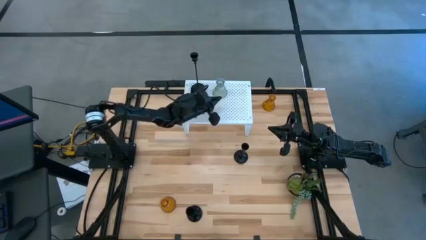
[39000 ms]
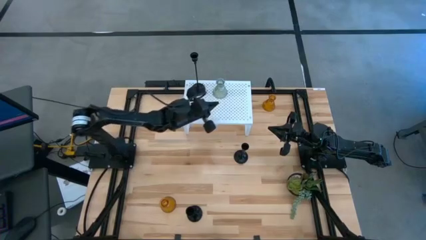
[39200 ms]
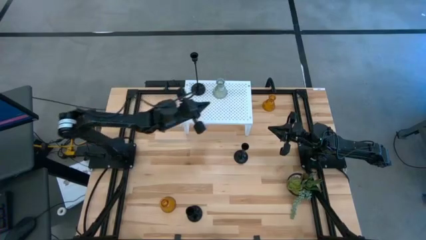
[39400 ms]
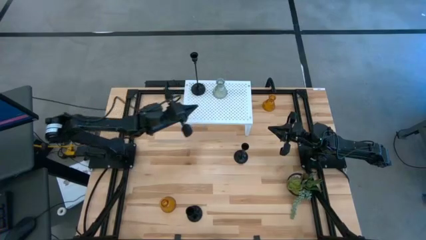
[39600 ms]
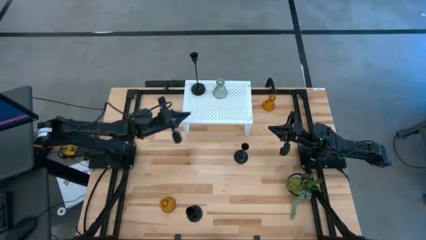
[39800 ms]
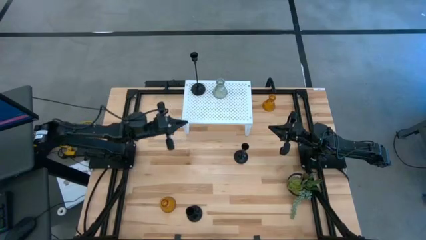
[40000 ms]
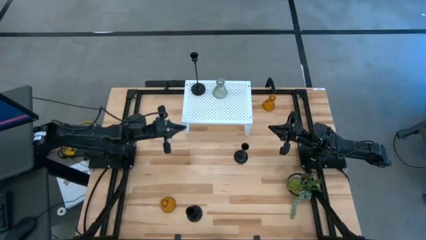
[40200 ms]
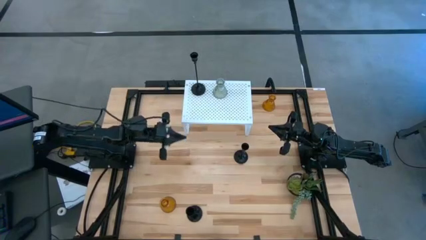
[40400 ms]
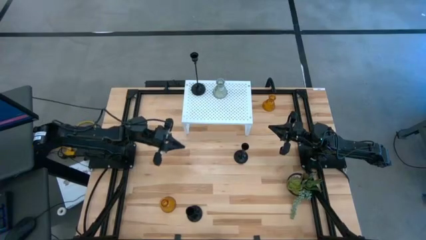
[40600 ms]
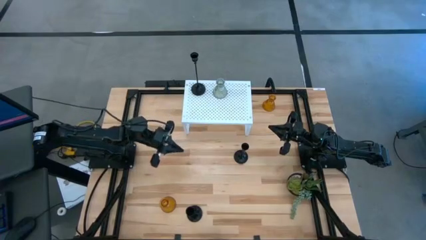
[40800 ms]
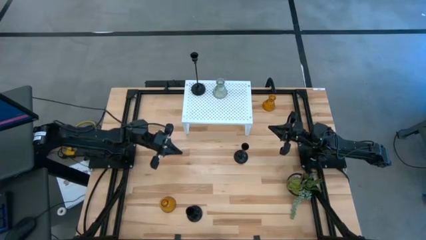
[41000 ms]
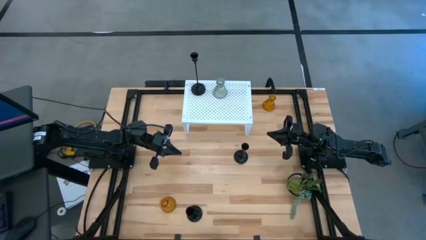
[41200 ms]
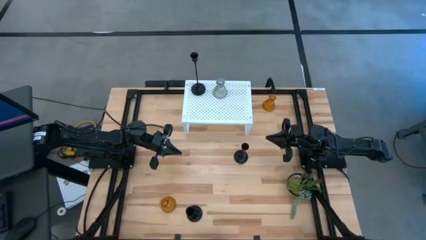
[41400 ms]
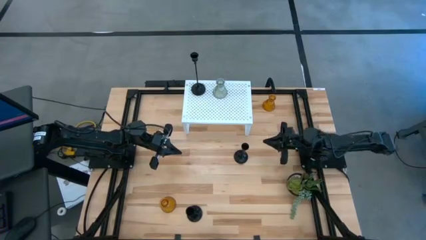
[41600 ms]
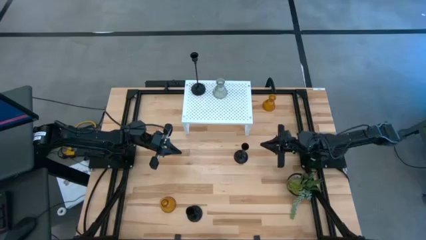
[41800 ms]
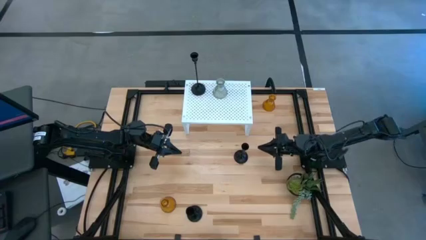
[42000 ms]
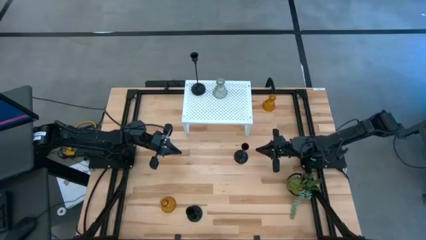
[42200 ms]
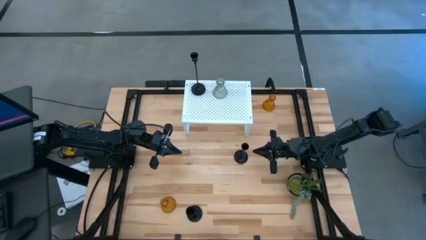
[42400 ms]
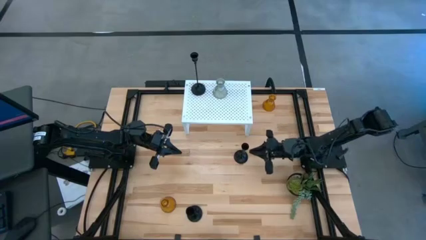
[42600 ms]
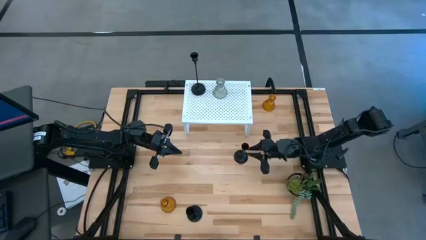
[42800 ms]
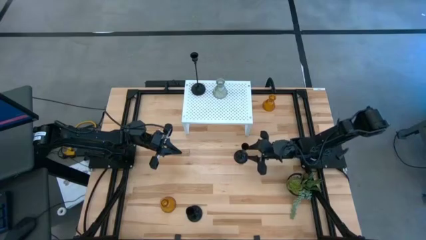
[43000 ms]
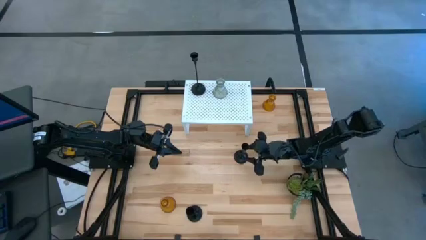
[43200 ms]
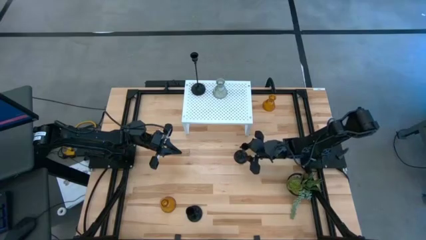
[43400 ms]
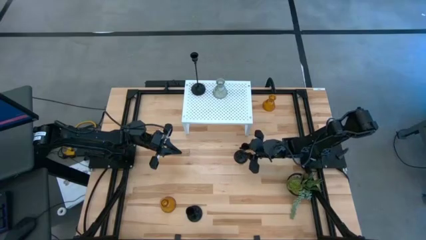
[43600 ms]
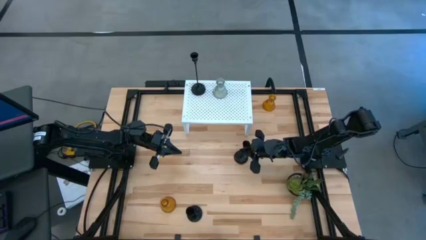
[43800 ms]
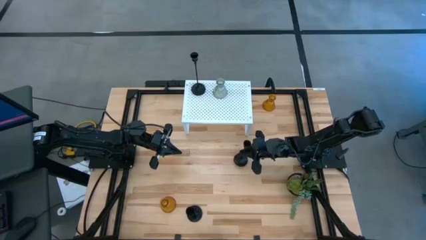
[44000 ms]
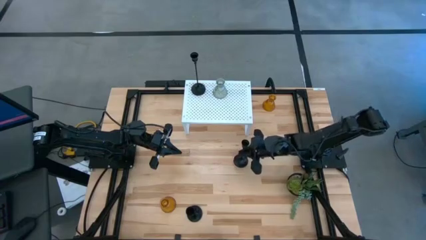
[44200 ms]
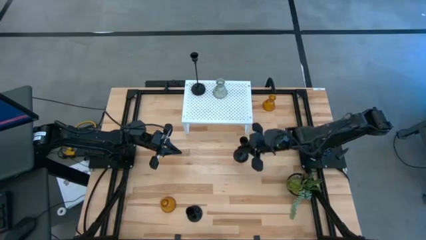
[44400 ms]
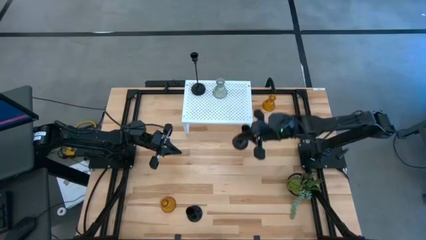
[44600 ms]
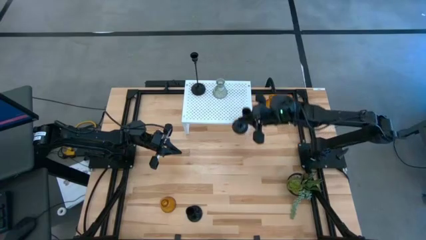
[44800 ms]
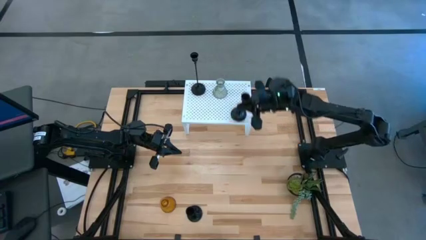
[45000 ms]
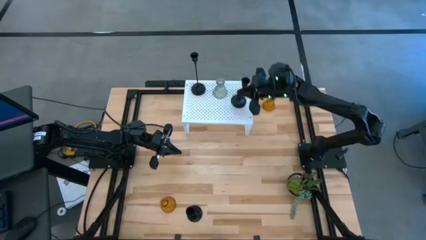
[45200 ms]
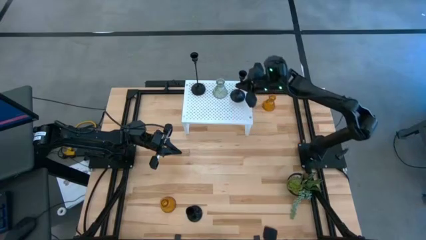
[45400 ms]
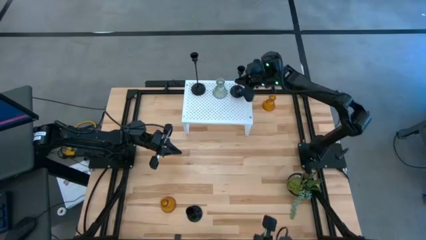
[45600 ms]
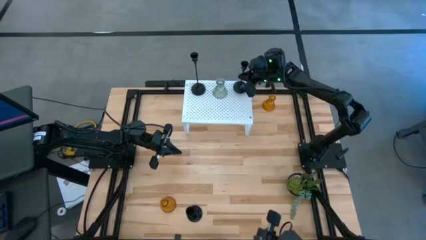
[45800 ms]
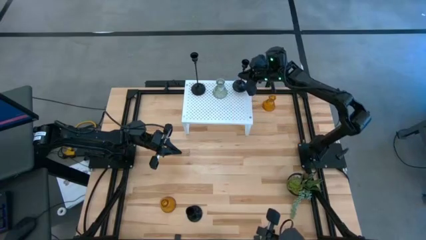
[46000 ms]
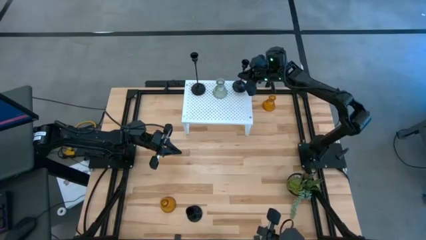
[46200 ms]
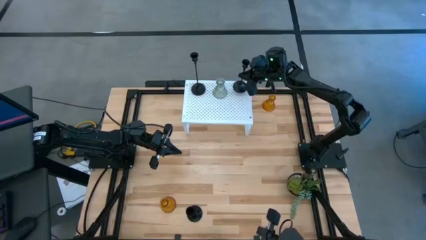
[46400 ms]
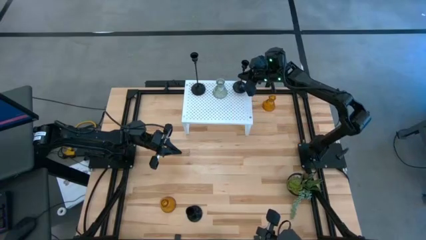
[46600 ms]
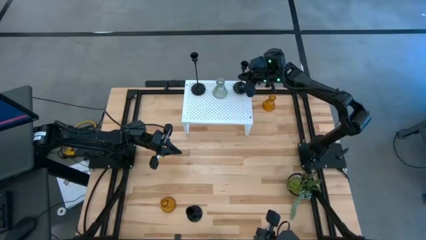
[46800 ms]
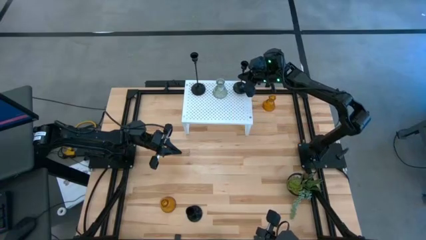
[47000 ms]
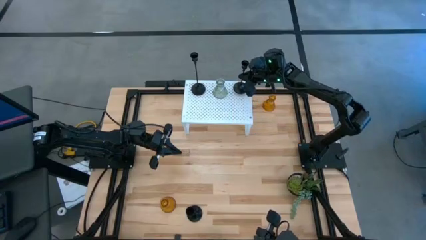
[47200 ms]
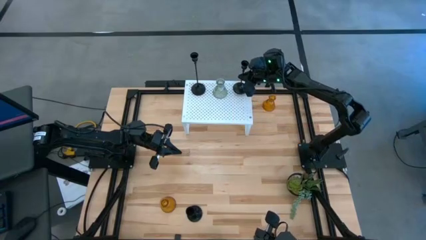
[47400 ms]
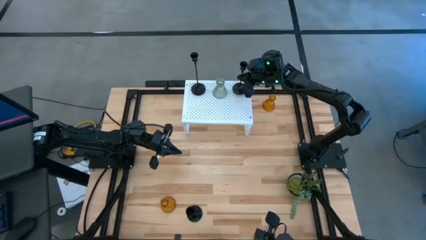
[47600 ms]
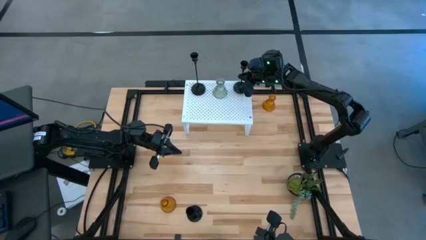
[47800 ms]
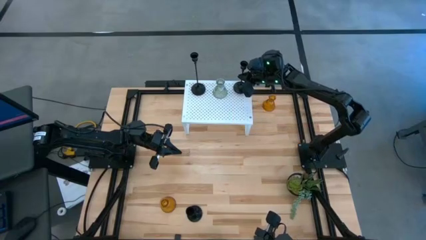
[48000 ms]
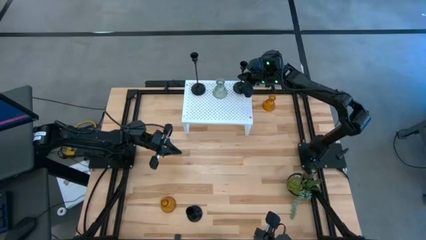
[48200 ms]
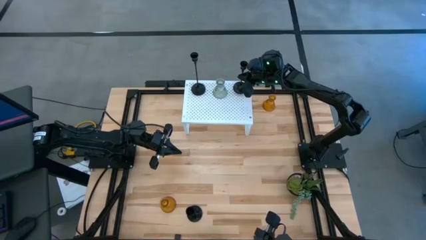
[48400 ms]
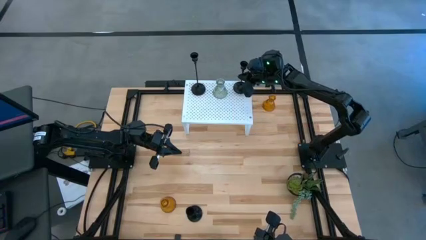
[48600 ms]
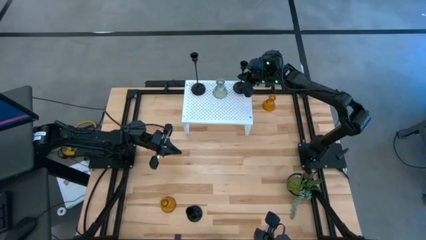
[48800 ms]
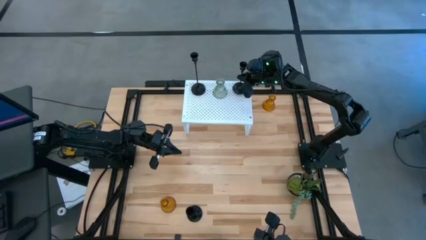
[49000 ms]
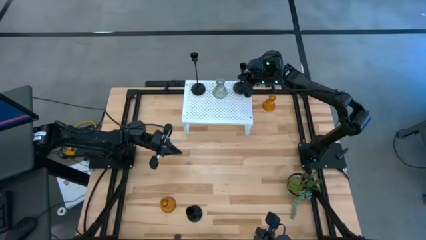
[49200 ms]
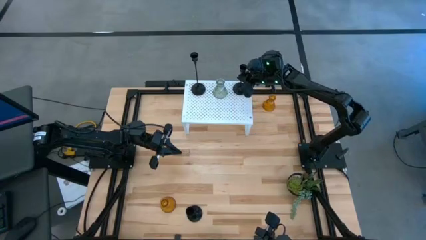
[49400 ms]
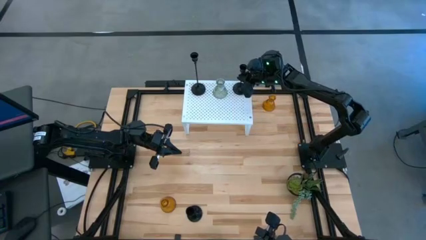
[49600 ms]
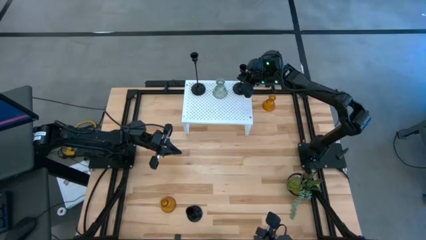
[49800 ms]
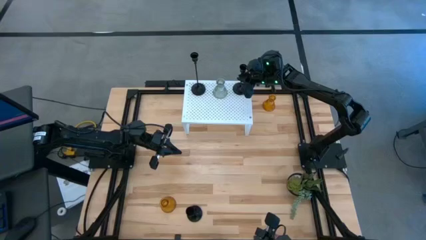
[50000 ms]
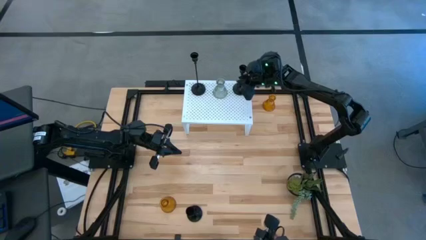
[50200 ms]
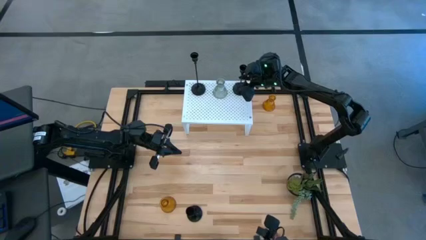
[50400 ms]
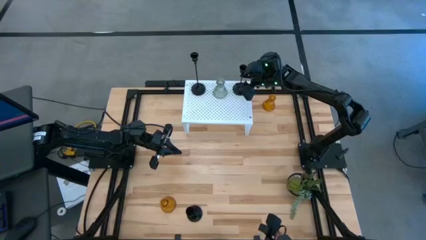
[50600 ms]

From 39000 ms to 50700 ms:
Task: Pick & Place candle stick holders
Put the top black candle holder on the shelf
